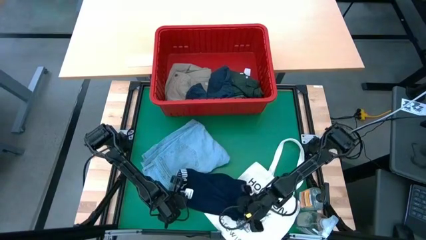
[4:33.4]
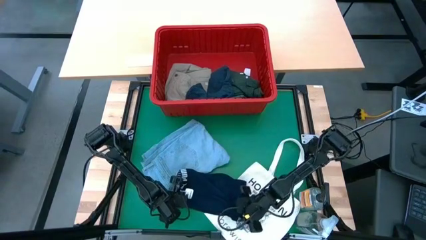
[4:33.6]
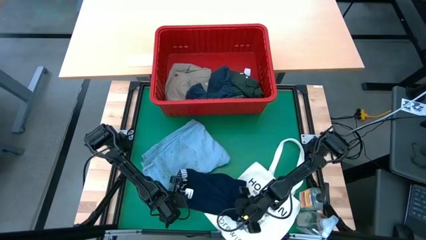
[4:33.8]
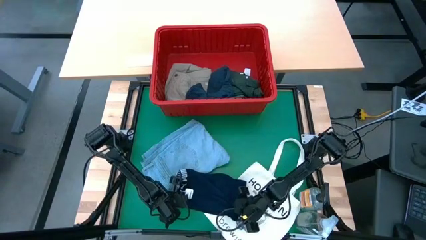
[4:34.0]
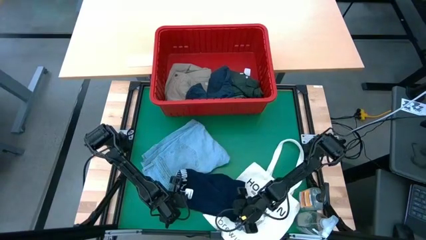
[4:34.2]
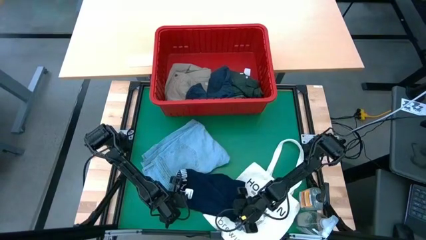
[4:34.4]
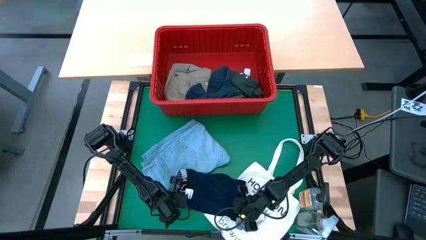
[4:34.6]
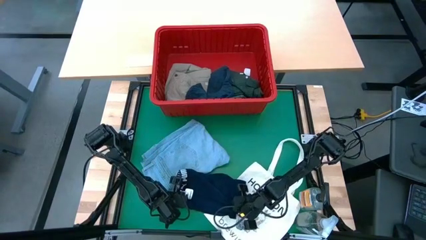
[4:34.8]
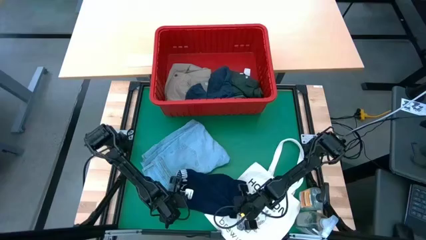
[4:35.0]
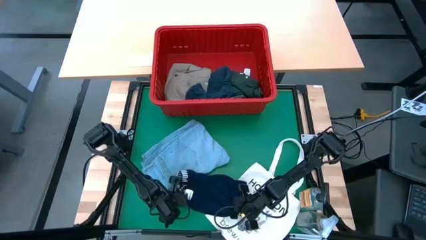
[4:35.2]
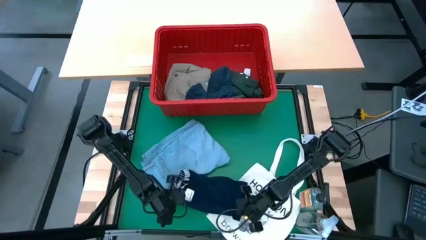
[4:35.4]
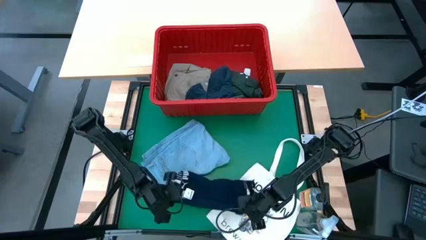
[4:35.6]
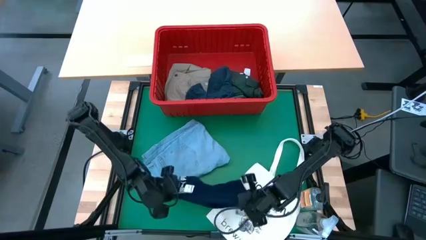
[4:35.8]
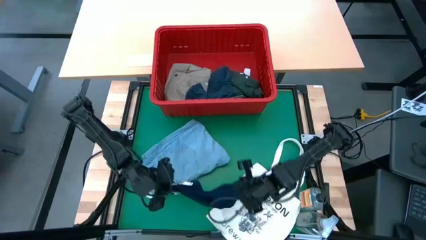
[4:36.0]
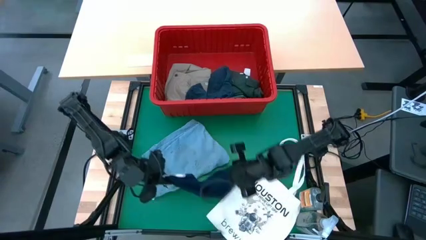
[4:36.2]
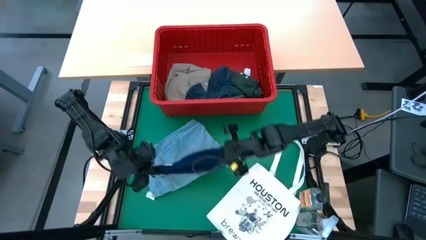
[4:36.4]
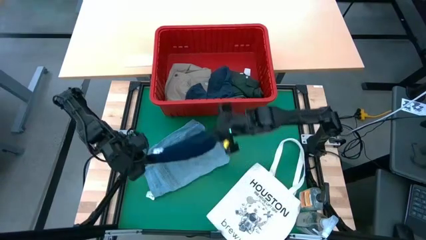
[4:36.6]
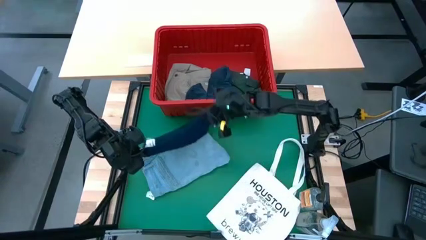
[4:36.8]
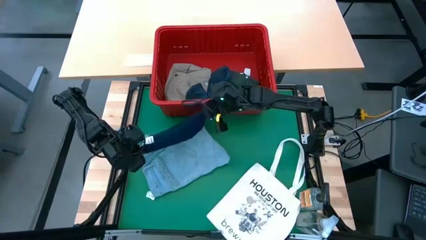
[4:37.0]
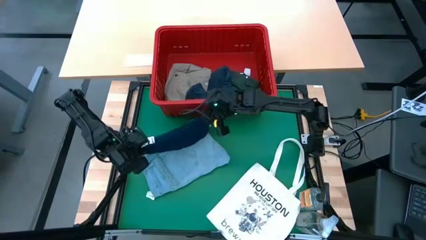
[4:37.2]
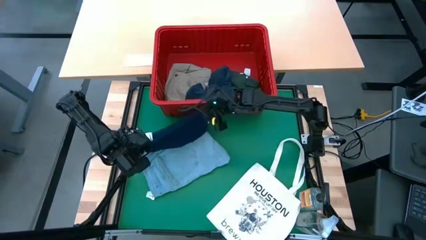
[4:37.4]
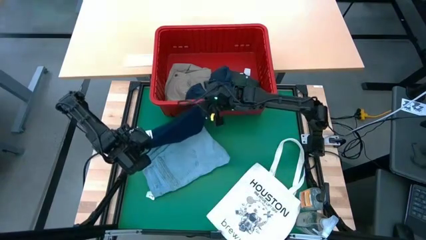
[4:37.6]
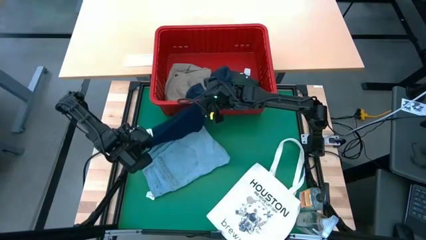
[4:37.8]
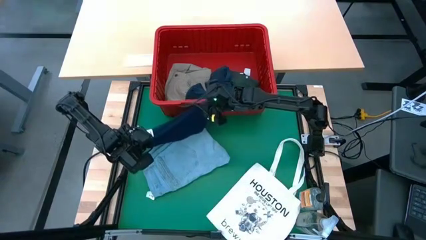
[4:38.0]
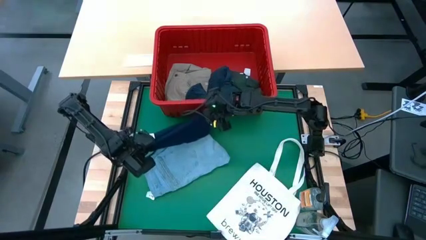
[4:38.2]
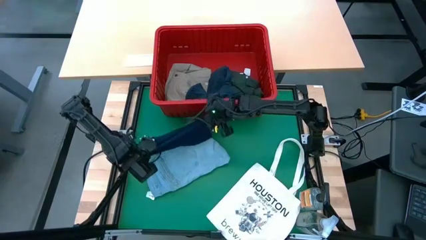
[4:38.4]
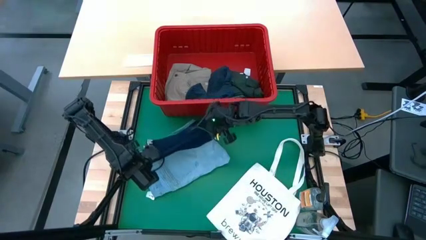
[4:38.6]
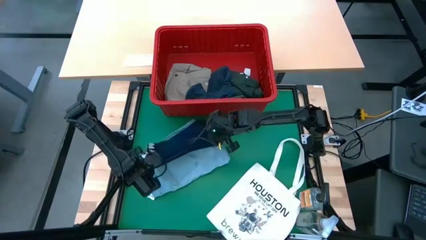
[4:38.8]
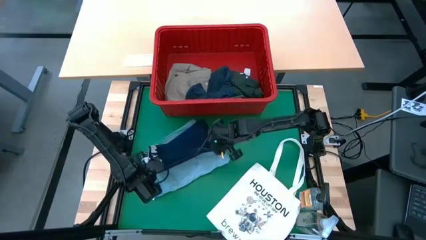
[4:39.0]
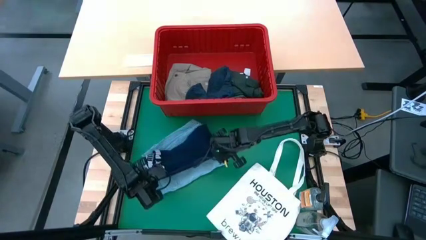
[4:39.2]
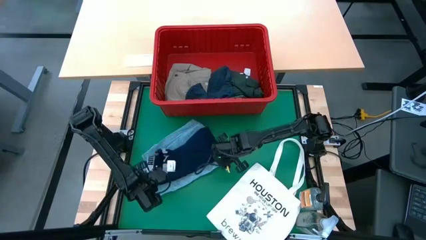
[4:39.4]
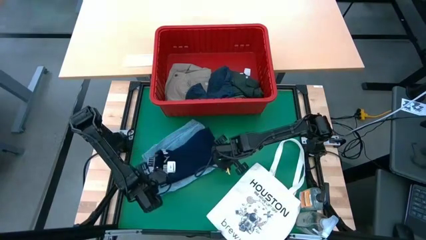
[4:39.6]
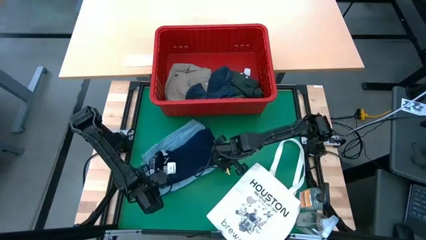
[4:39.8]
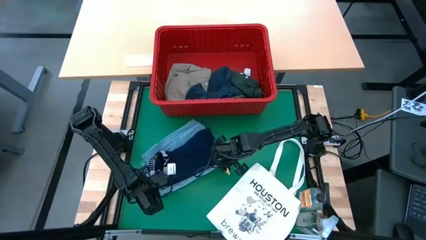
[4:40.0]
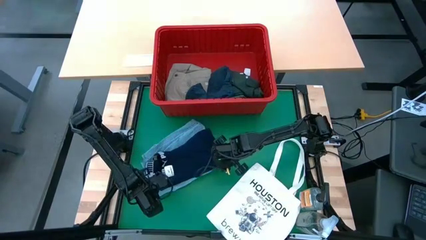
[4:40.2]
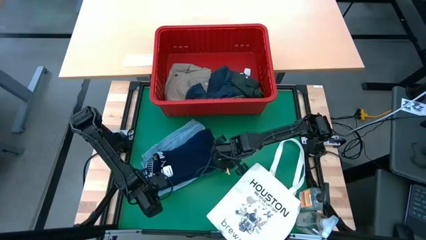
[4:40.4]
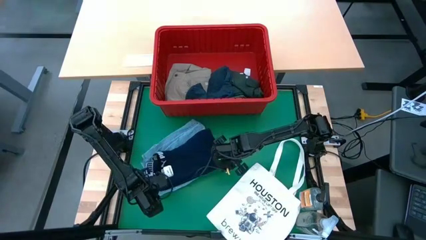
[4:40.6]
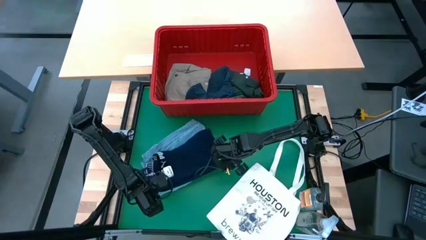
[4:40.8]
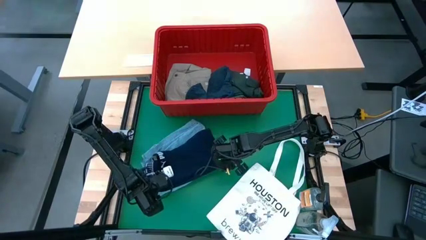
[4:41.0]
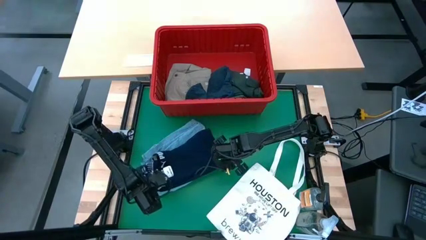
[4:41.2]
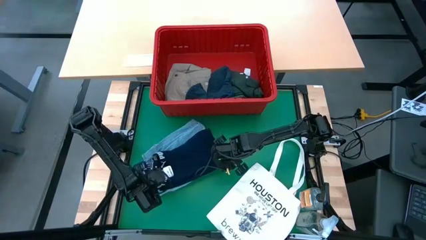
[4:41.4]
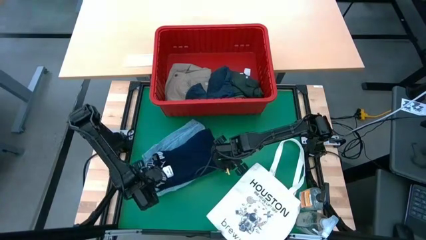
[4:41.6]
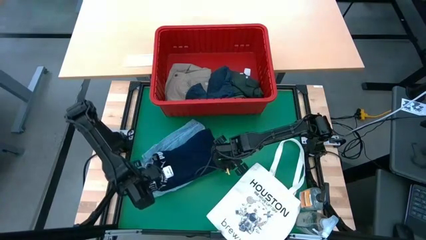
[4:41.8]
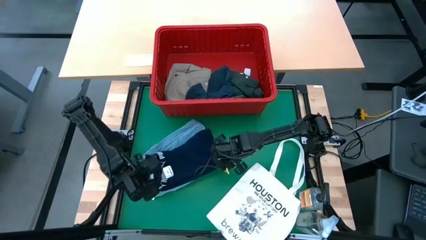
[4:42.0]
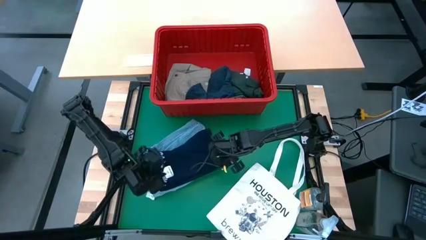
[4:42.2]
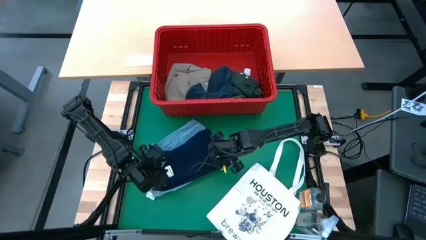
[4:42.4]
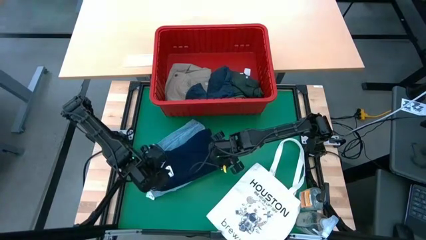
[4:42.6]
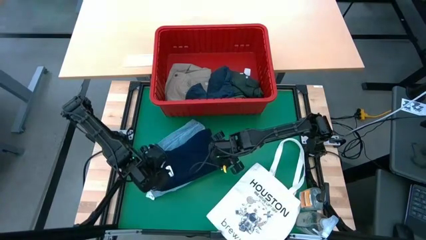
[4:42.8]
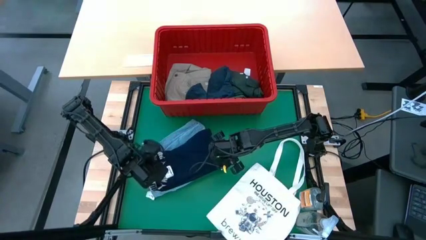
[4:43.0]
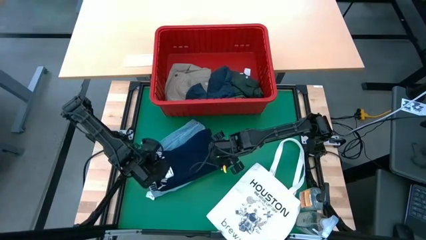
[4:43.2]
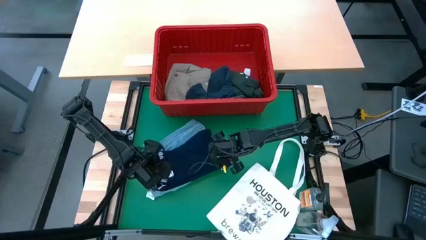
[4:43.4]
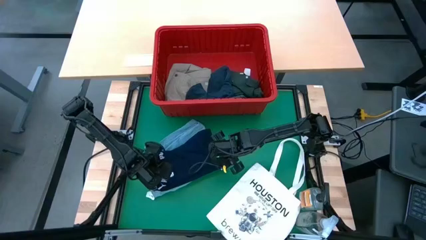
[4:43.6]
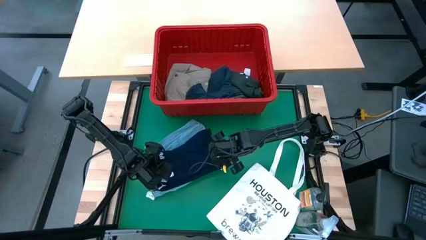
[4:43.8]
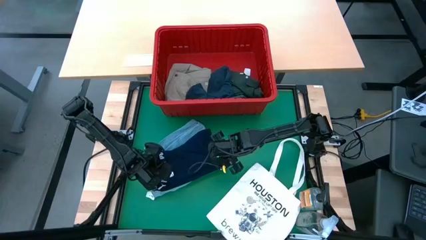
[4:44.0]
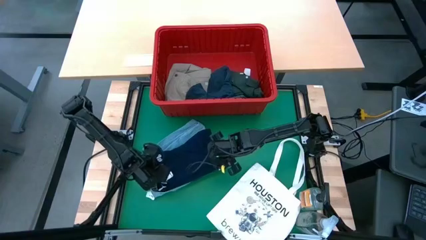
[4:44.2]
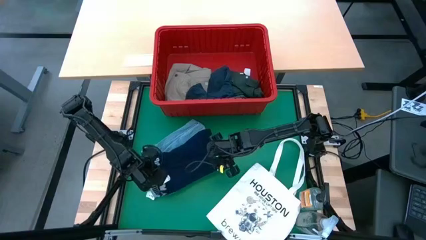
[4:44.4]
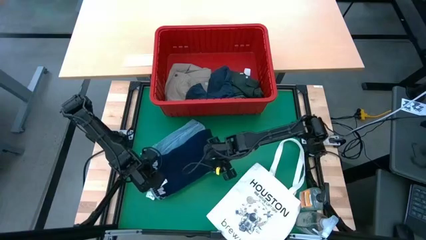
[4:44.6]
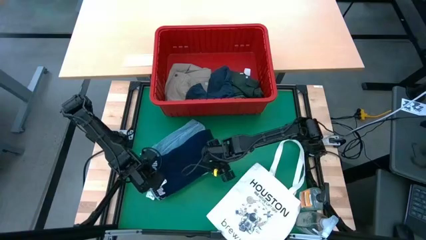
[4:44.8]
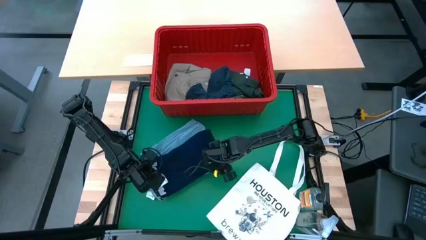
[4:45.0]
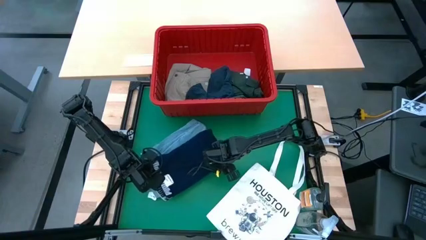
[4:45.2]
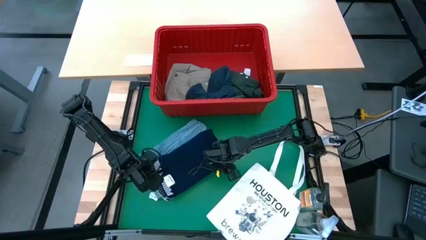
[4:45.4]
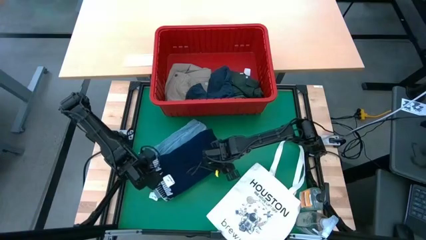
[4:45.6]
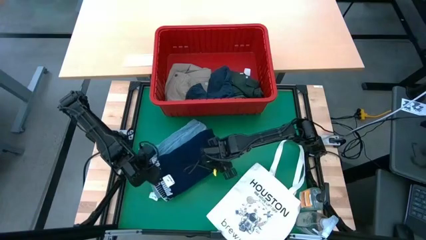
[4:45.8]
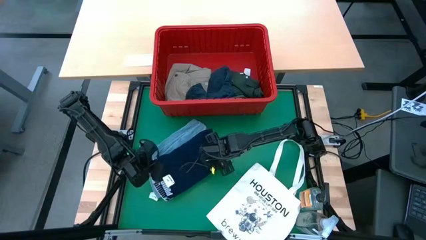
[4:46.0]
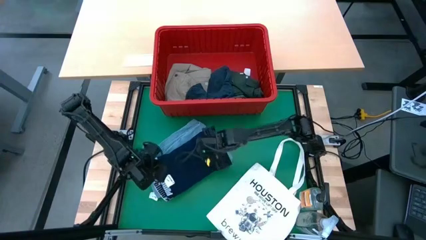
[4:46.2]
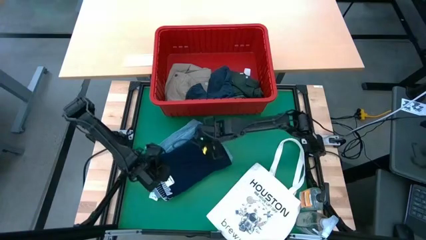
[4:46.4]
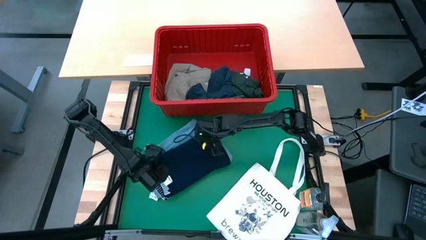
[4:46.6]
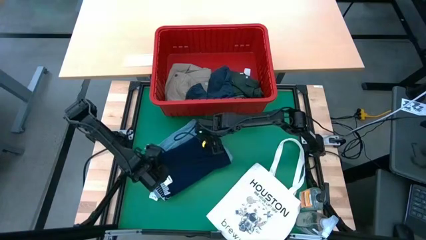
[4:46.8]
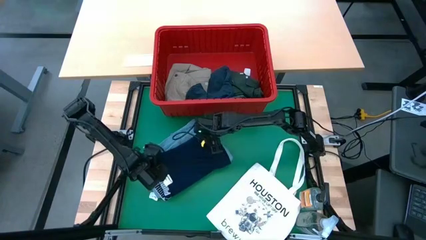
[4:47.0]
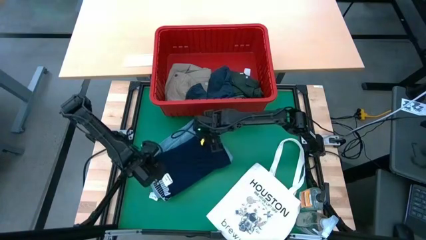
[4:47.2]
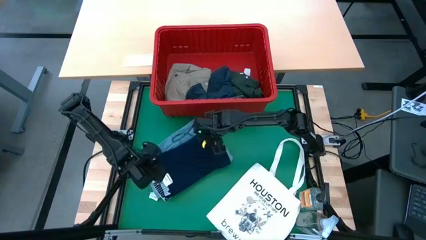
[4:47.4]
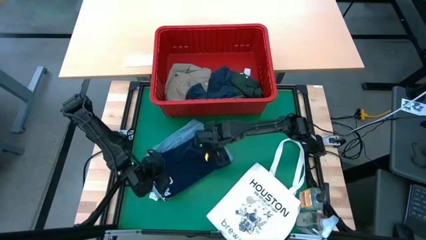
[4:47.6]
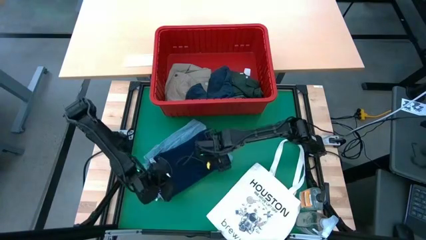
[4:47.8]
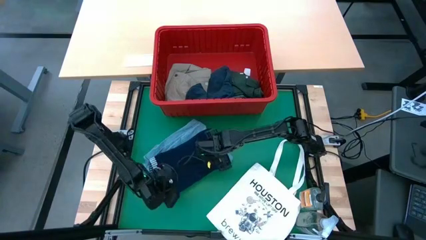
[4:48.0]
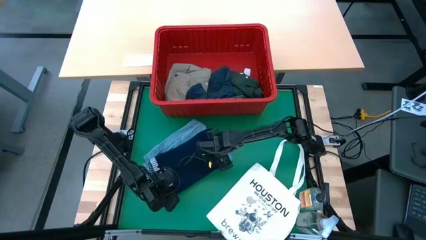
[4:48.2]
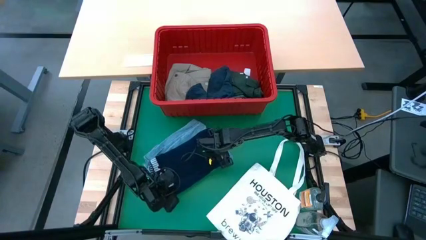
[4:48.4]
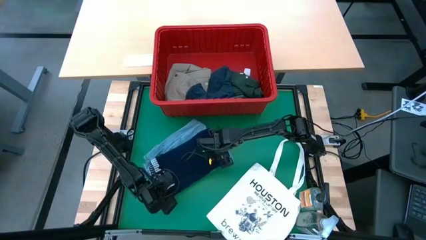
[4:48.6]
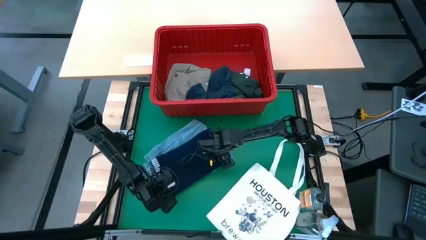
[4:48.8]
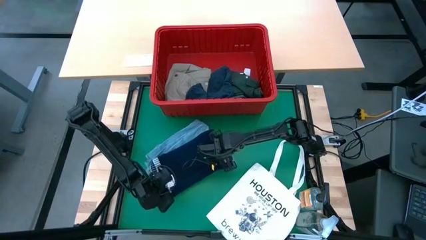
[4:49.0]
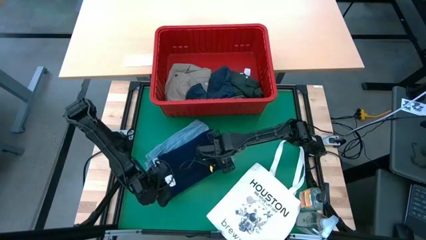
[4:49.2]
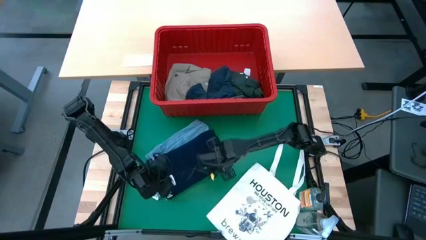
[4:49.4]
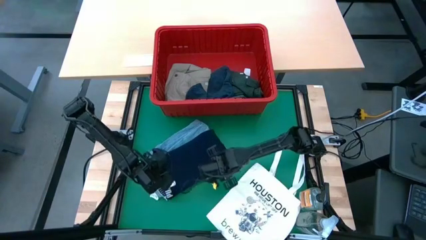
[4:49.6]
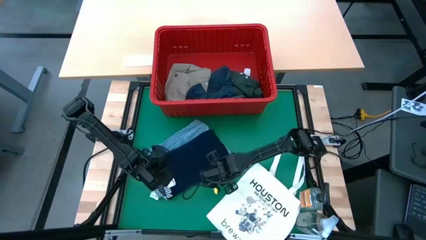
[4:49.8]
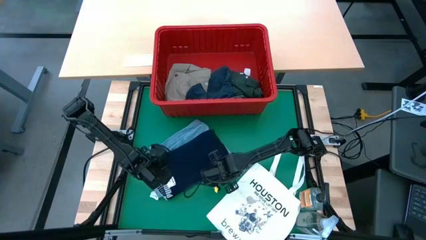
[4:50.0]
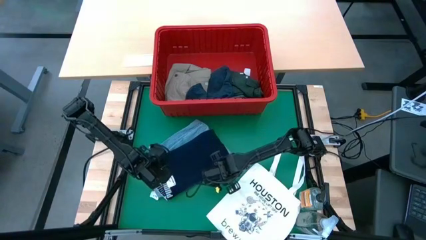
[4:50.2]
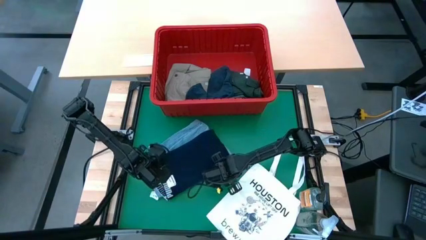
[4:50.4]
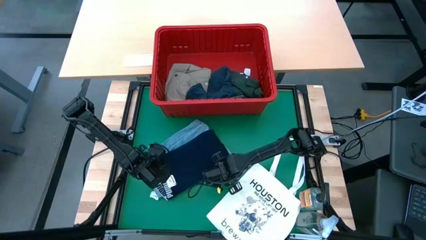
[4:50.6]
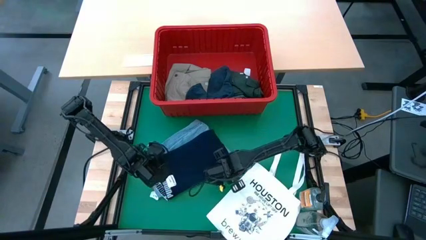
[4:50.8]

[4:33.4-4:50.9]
Task: Fold Laundry from Bin
Stack the dark blue boxer shorts on top of the blue jeans
